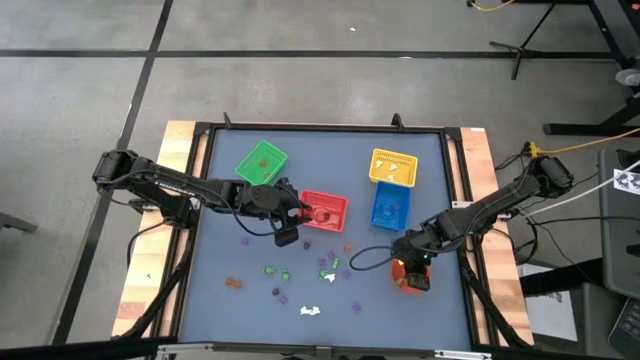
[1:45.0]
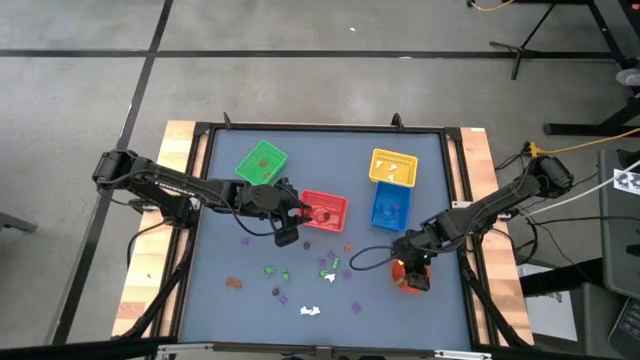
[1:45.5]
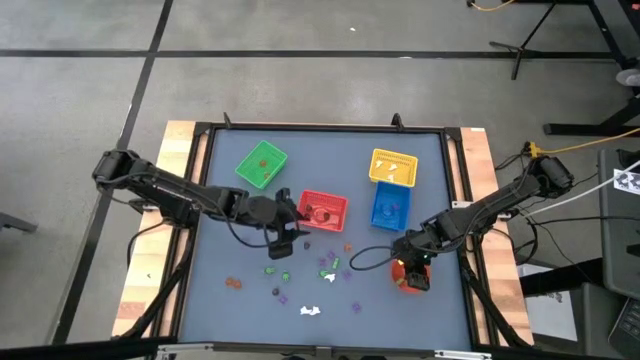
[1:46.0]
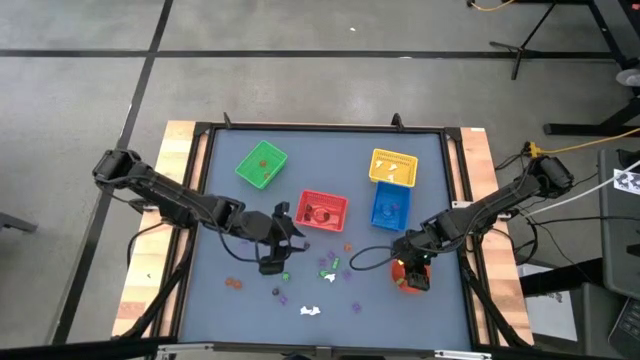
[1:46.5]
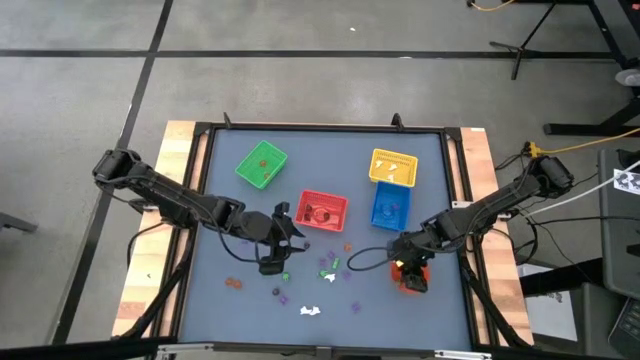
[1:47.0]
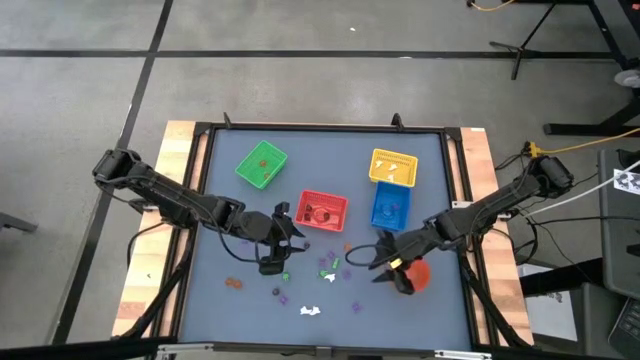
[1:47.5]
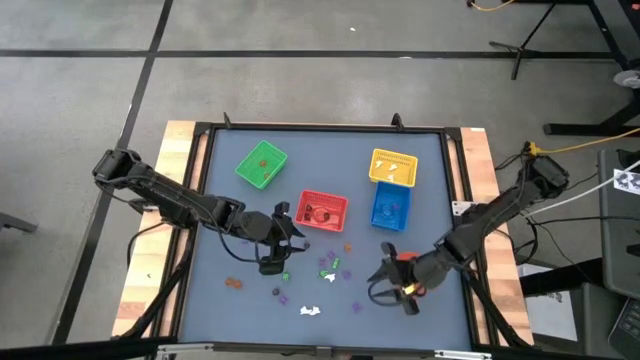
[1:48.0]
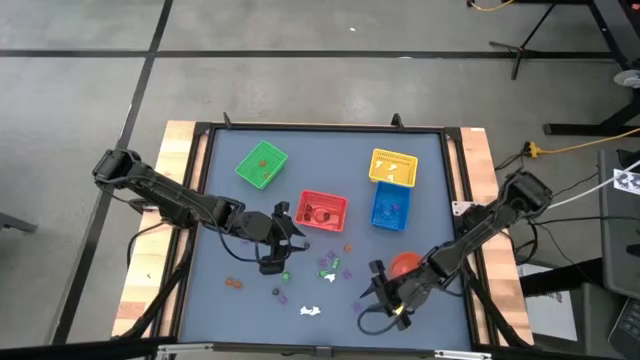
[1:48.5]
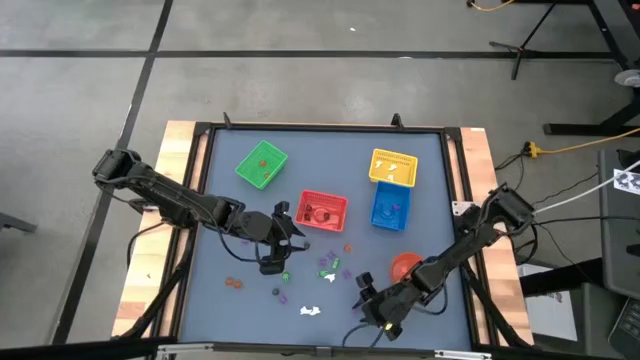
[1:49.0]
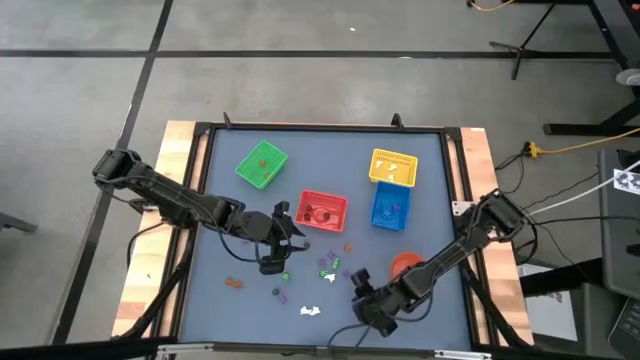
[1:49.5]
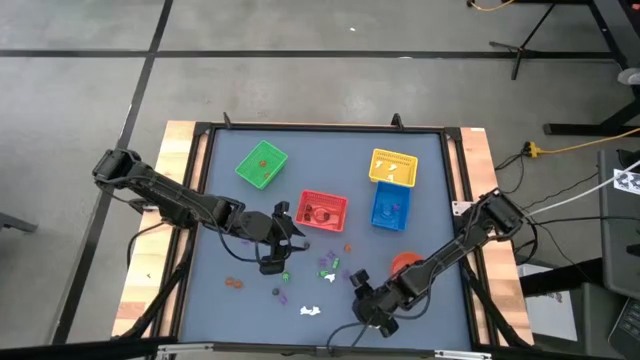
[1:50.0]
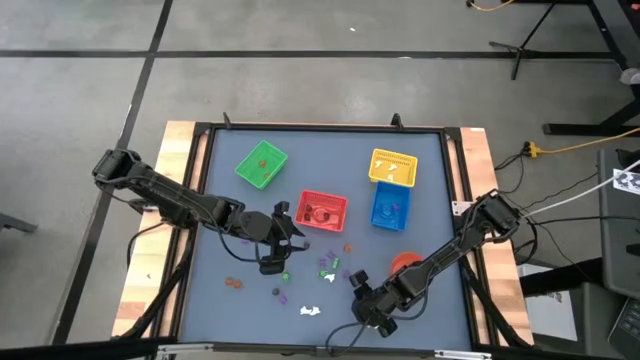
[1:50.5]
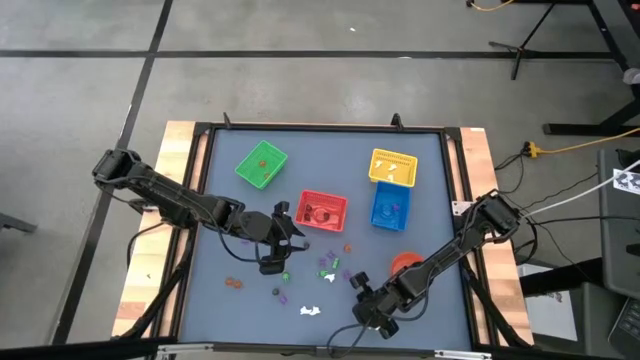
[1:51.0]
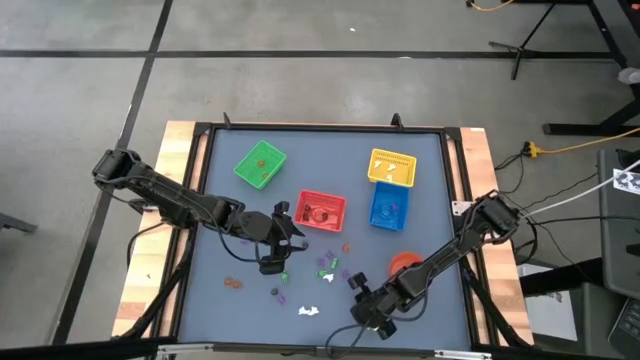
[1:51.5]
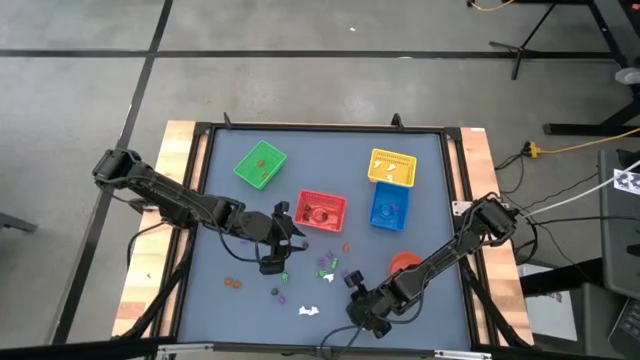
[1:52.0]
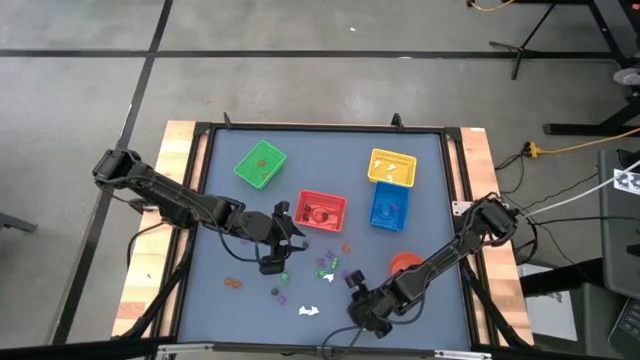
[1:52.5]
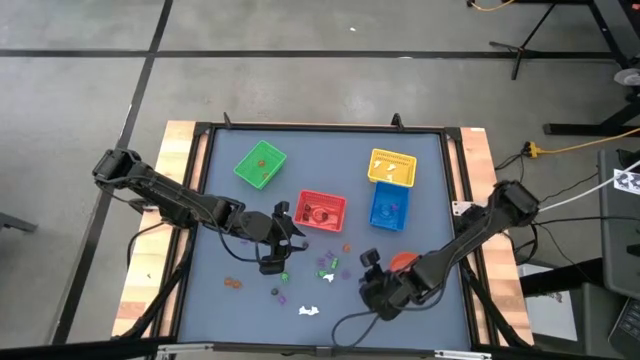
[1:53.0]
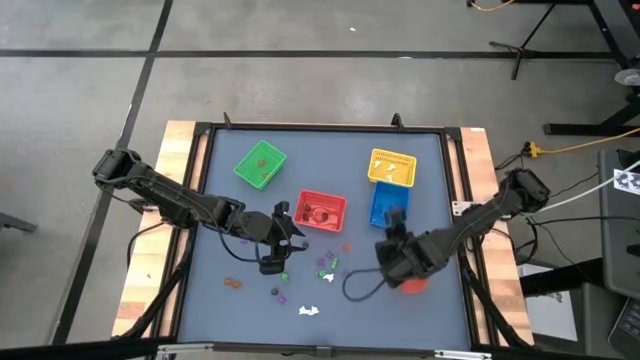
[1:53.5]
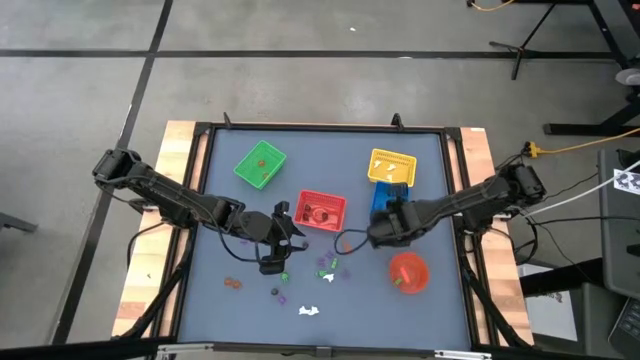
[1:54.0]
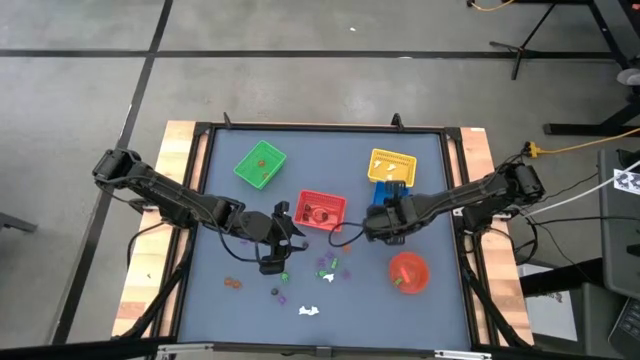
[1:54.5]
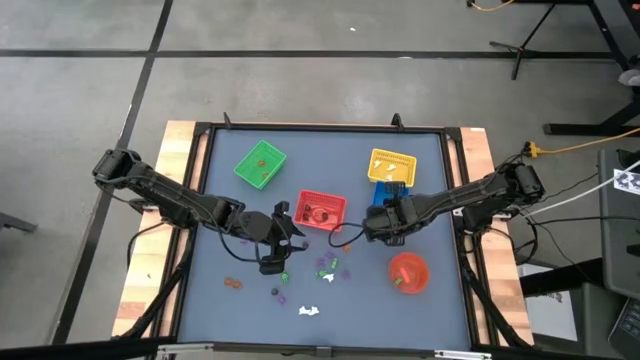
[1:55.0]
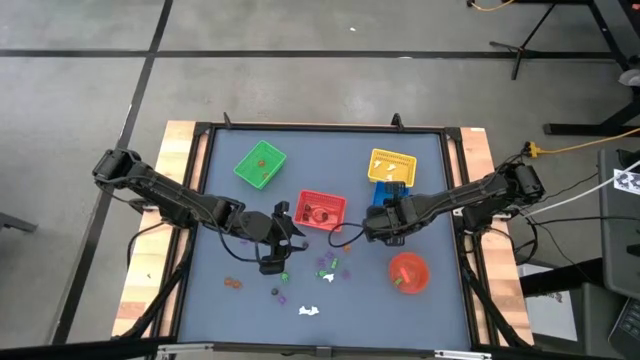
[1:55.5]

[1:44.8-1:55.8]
Task: Sort Halloween decoration
Put the violet spider toy into the blue bin

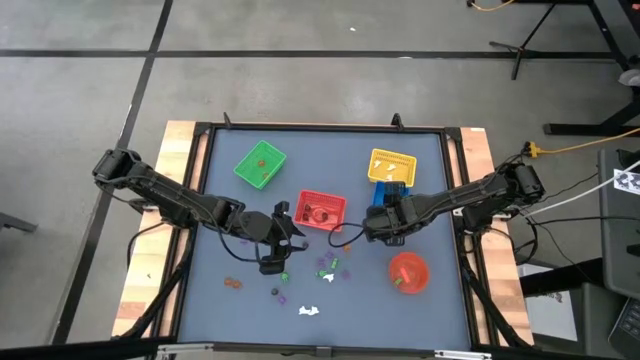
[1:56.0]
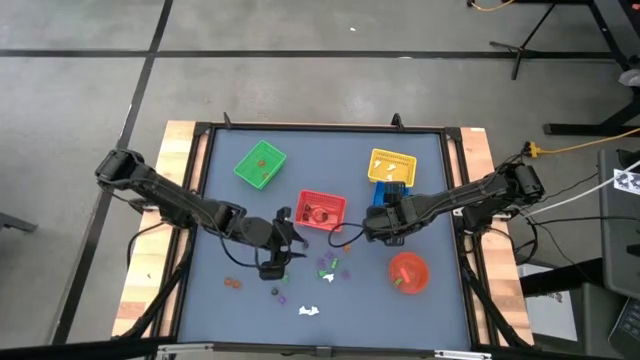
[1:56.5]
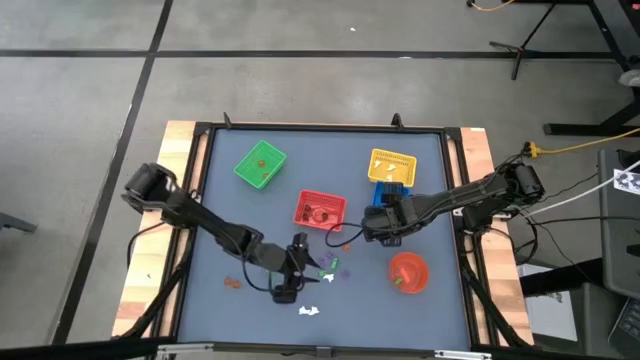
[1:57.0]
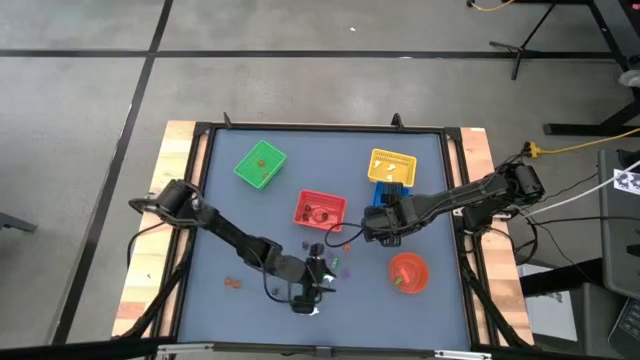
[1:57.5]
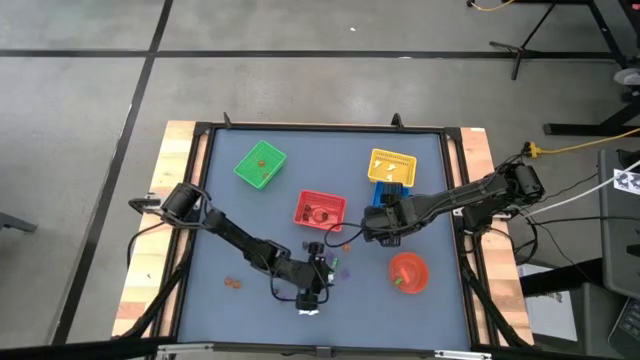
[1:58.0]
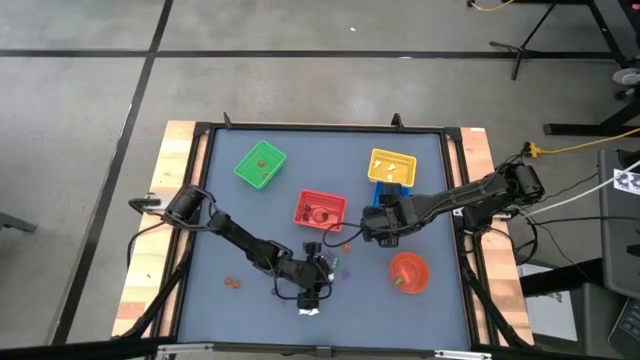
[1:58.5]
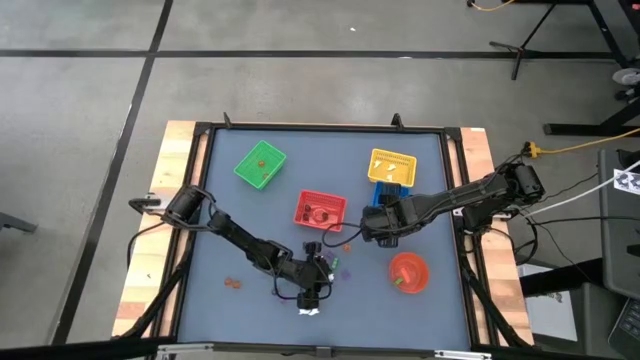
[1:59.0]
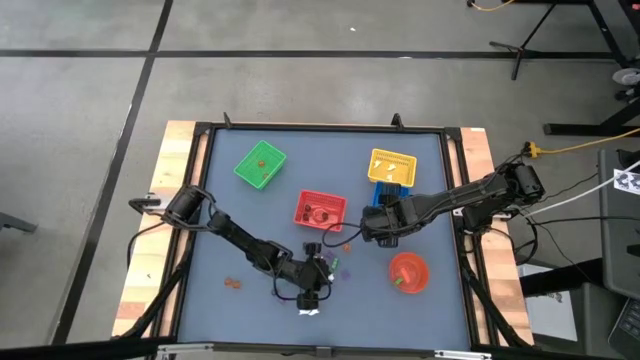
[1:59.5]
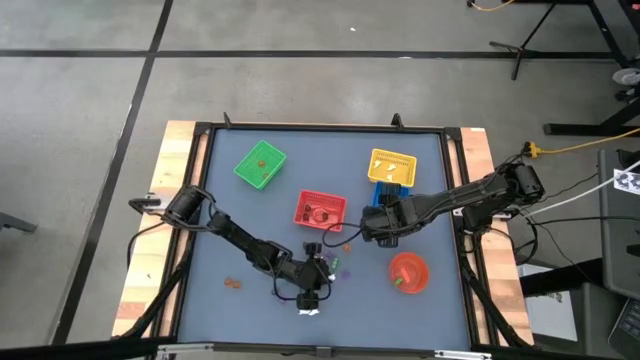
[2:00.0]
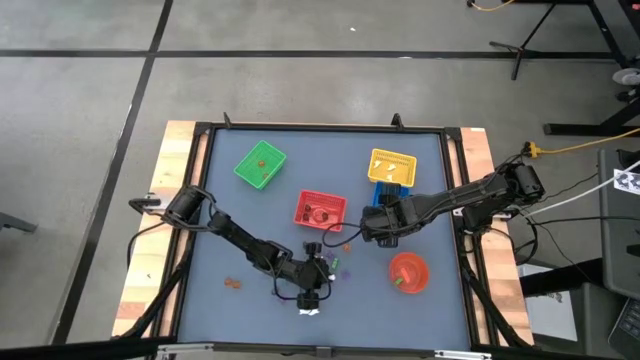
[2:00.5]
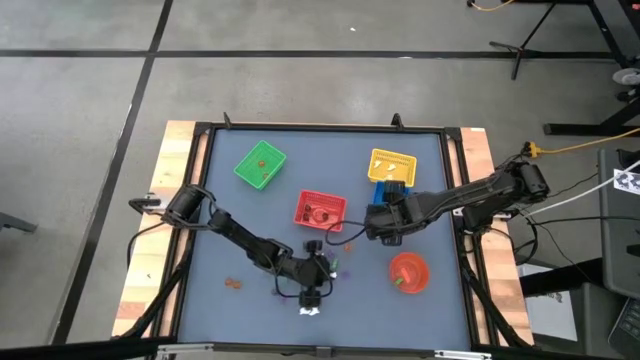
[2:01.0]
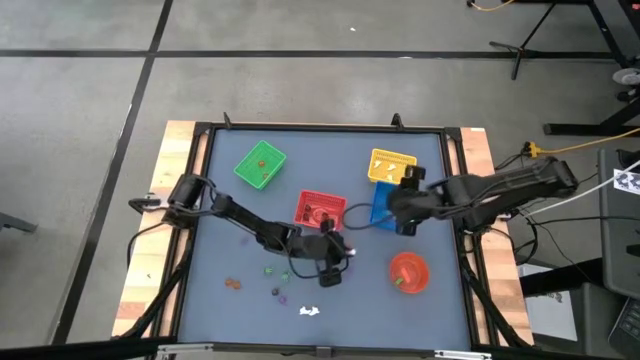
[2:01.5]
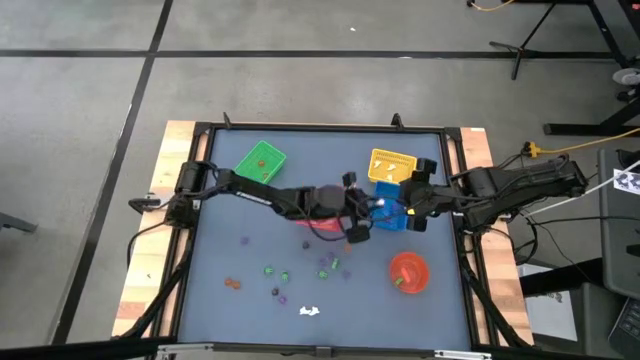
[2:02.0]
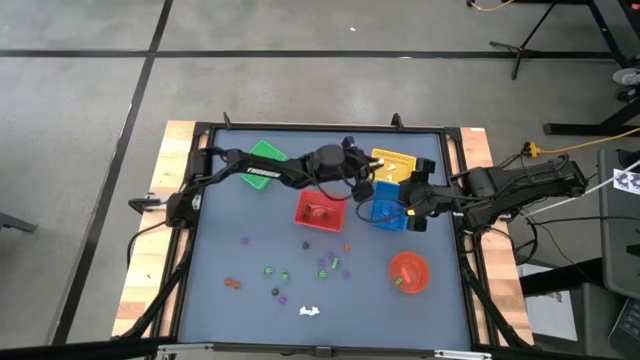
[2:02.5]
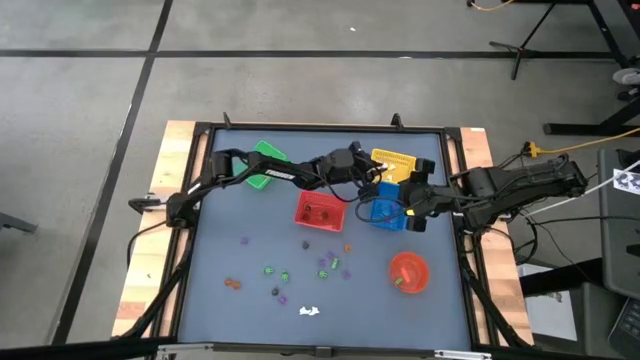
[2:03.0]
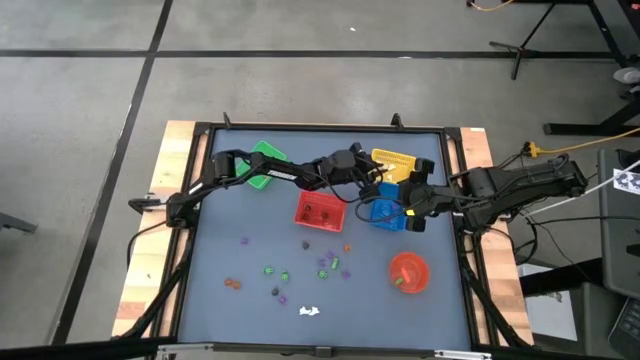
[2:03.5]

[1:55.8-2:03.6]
Put the white ghost toy into the yellow bin

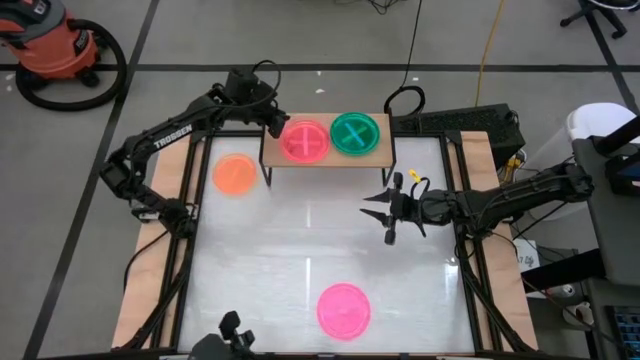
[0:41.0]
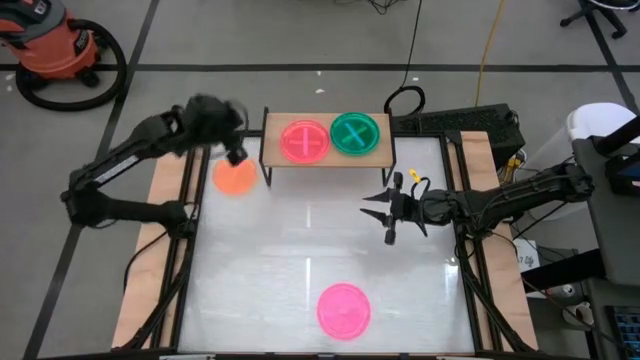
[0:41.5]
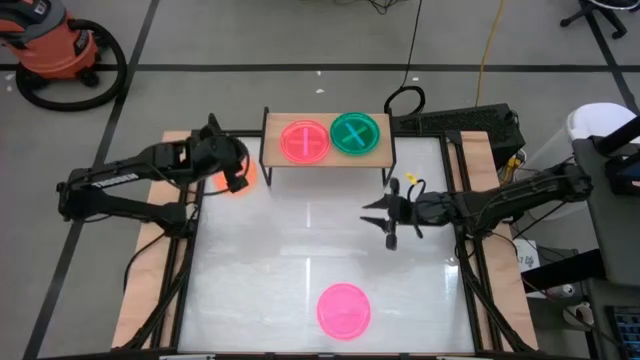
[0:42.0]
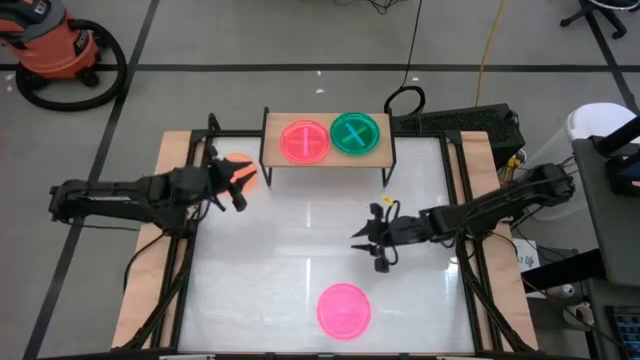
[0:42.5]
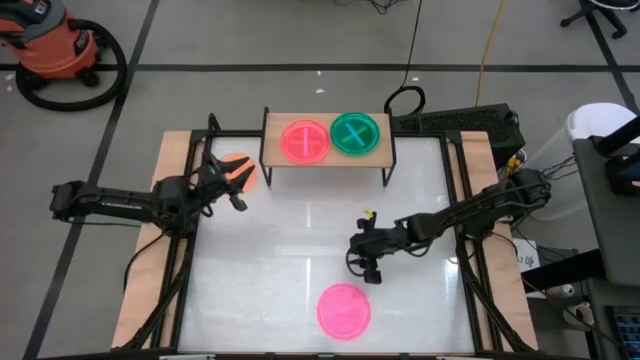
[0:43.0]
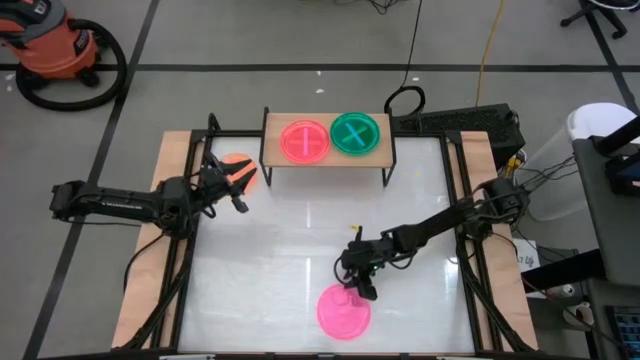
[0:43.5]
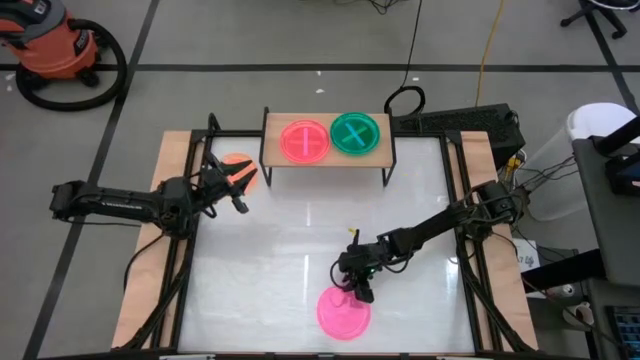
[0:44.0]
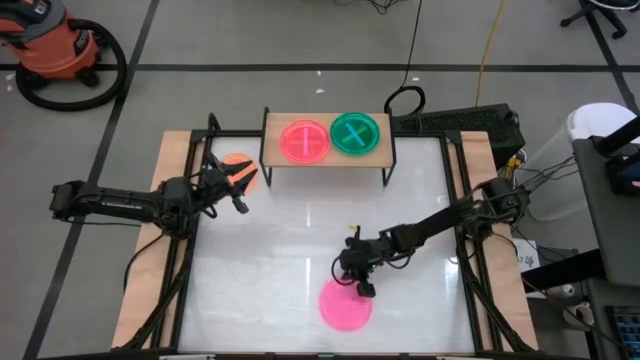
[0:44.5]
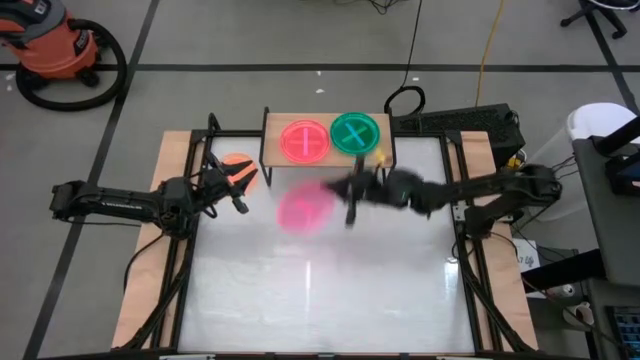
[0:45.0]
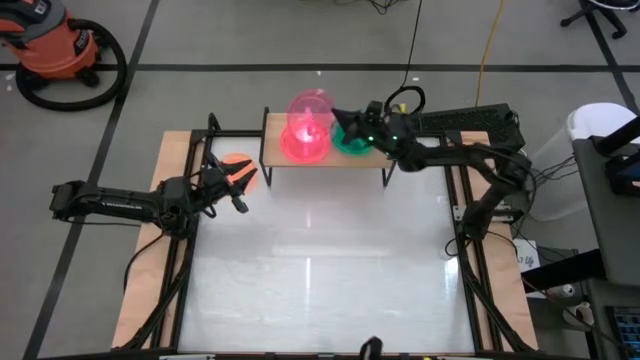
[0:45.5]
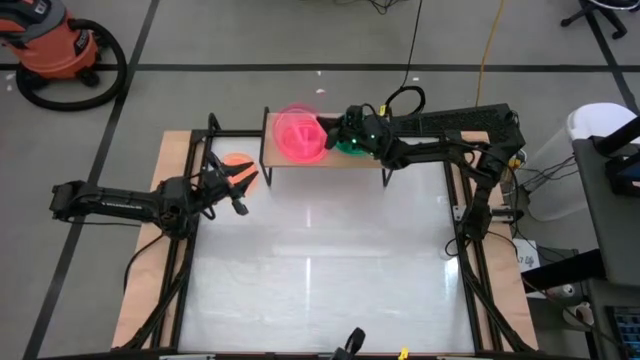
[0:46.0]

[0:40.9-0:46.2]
Task: Place and stack plates onto a shelf
Stack the pink transparent plate on the pink transparent plate on the shelf
